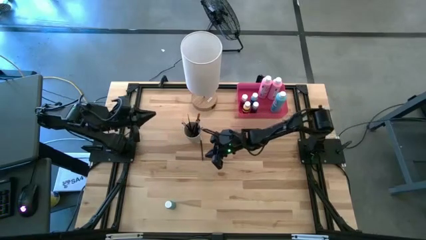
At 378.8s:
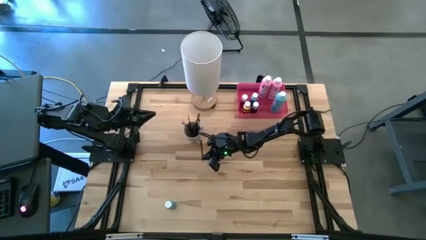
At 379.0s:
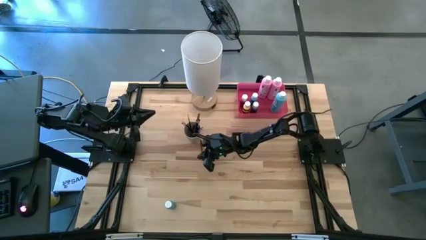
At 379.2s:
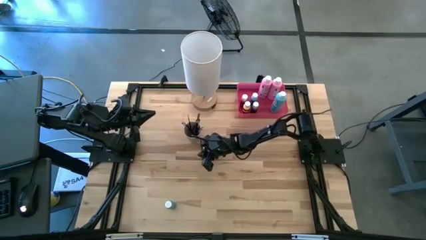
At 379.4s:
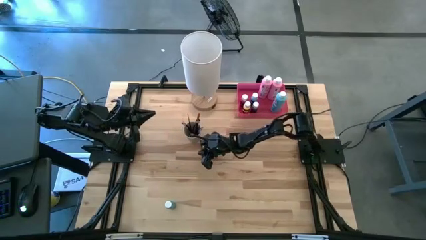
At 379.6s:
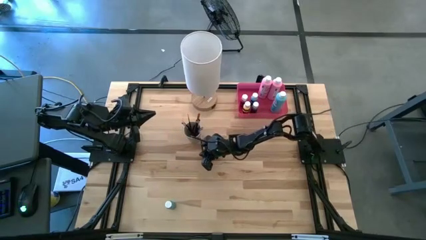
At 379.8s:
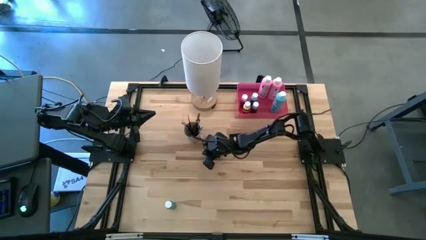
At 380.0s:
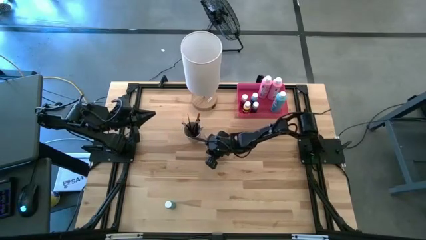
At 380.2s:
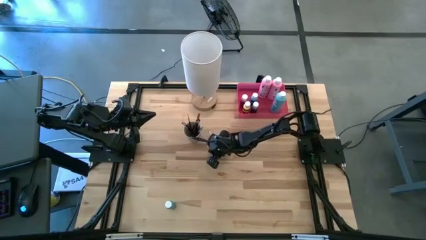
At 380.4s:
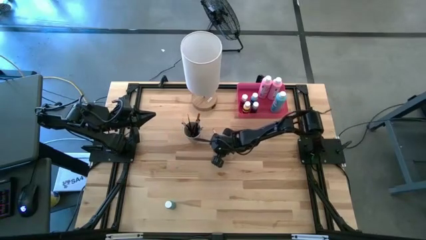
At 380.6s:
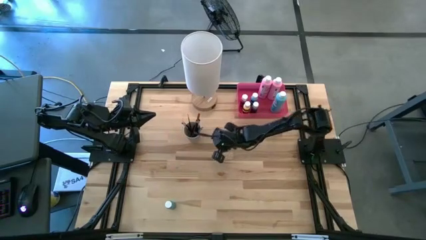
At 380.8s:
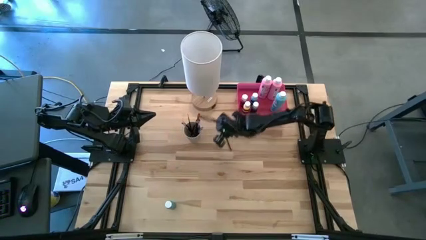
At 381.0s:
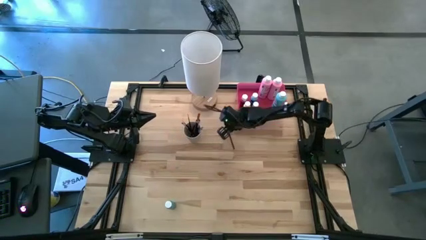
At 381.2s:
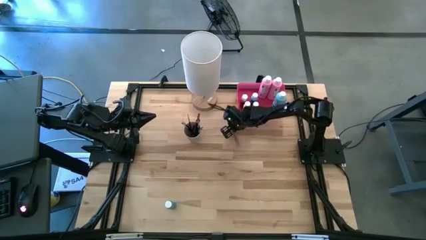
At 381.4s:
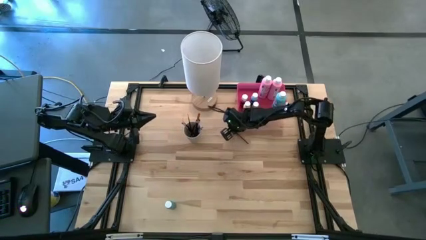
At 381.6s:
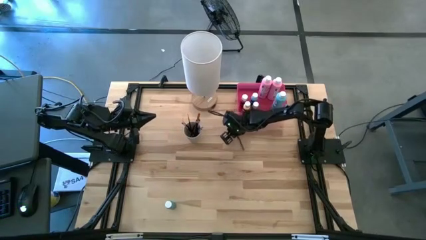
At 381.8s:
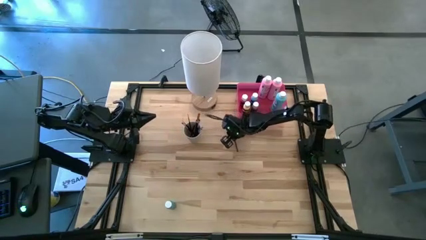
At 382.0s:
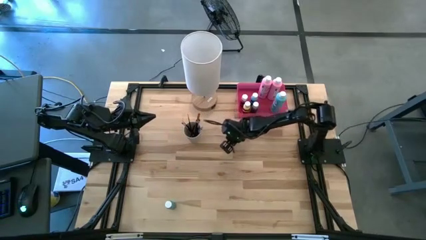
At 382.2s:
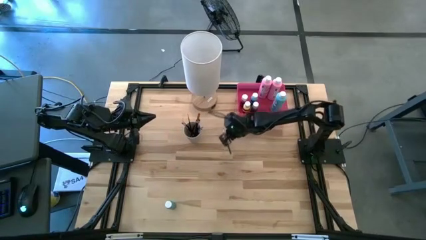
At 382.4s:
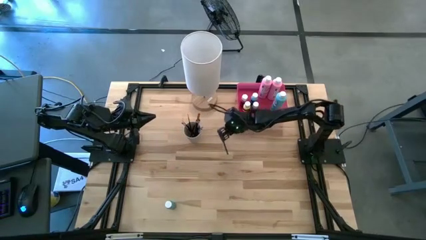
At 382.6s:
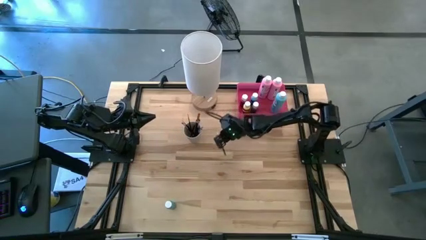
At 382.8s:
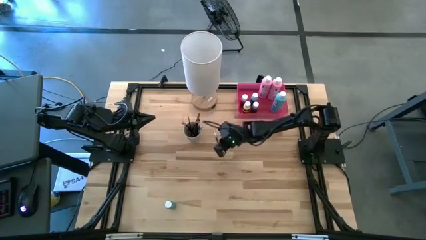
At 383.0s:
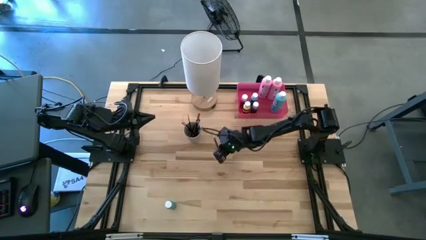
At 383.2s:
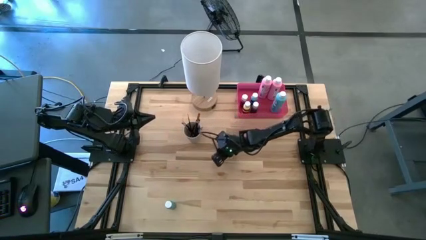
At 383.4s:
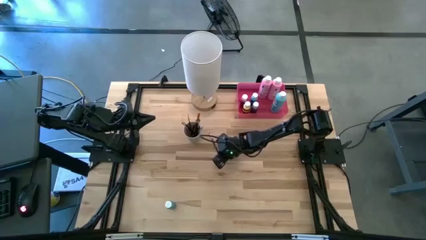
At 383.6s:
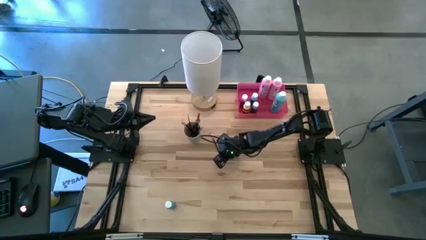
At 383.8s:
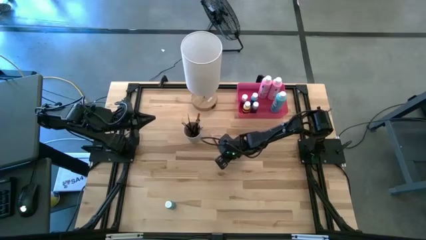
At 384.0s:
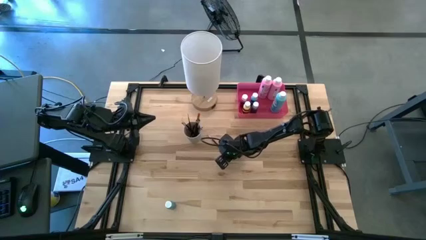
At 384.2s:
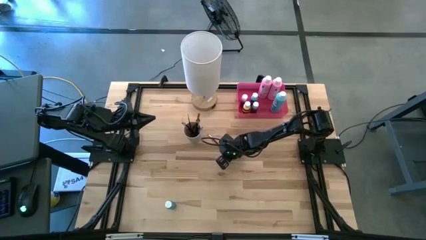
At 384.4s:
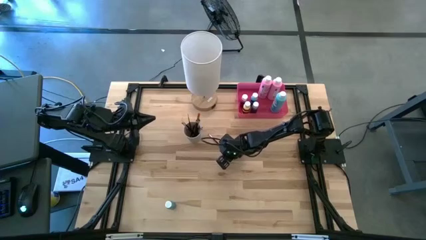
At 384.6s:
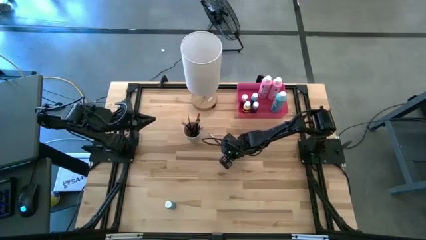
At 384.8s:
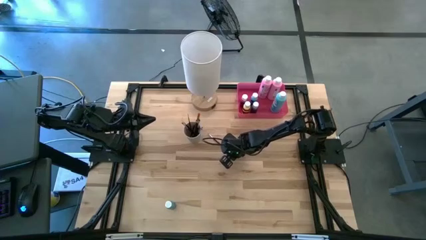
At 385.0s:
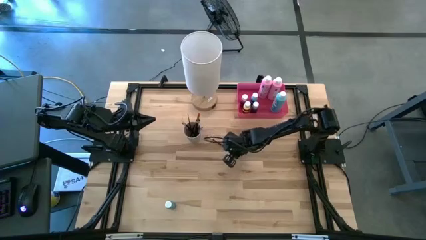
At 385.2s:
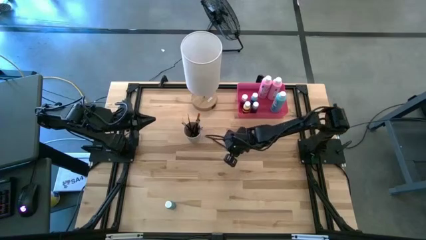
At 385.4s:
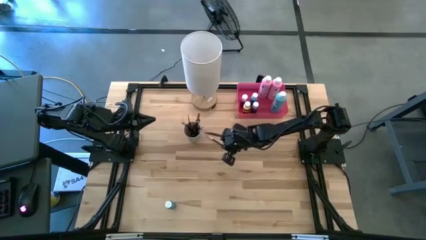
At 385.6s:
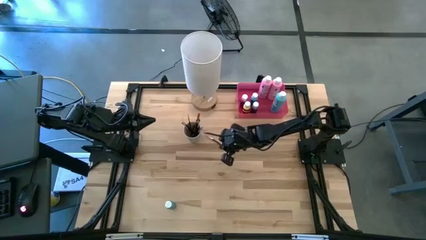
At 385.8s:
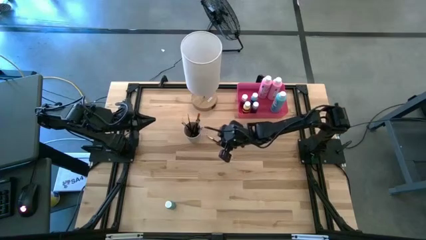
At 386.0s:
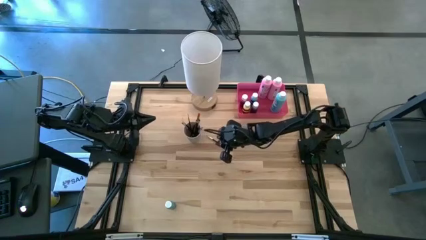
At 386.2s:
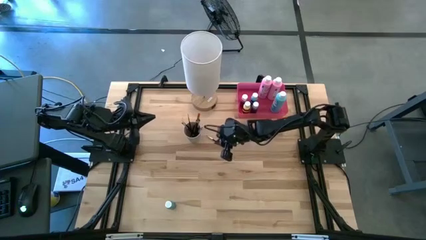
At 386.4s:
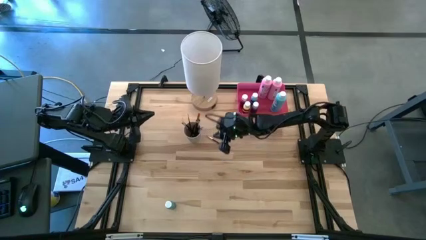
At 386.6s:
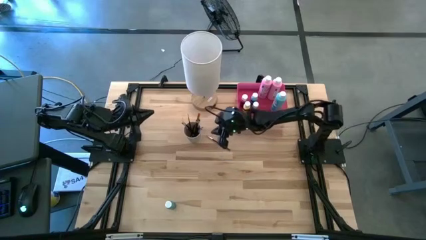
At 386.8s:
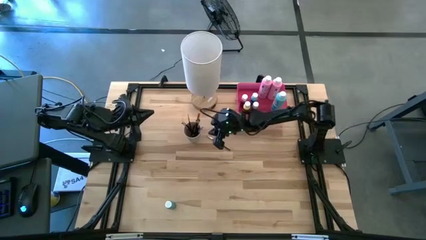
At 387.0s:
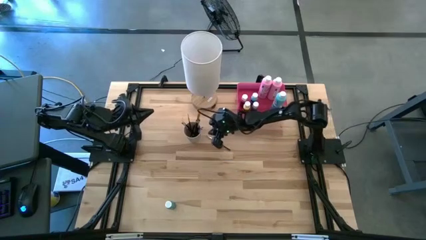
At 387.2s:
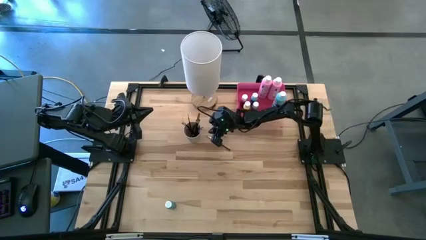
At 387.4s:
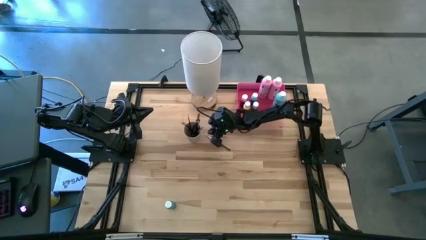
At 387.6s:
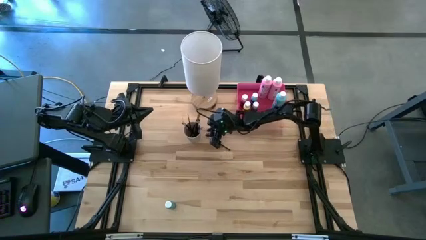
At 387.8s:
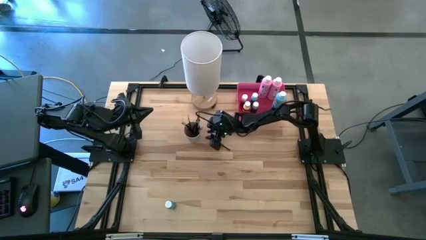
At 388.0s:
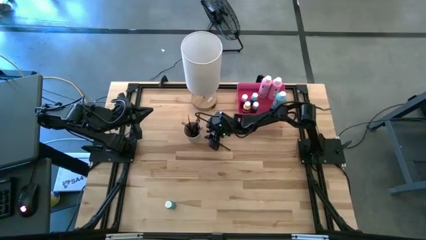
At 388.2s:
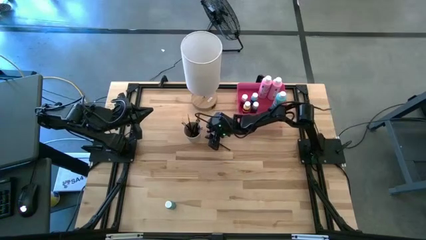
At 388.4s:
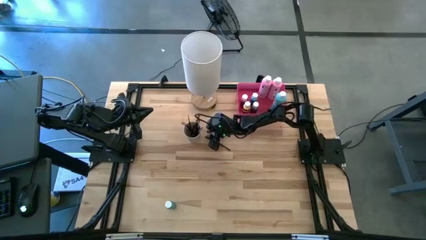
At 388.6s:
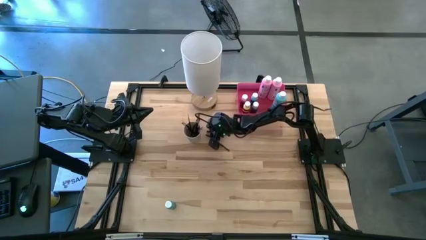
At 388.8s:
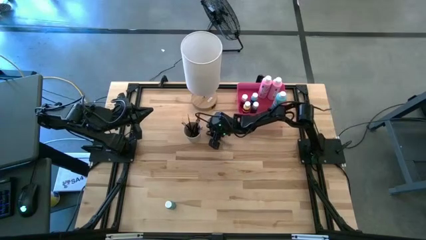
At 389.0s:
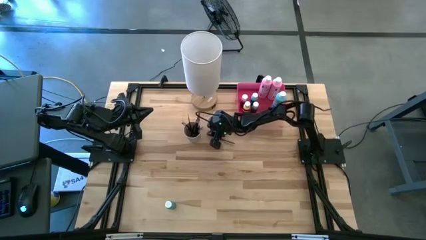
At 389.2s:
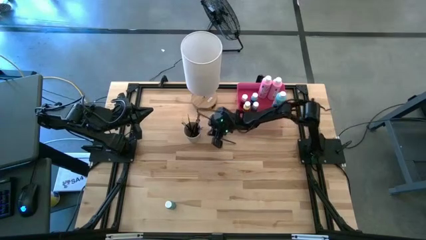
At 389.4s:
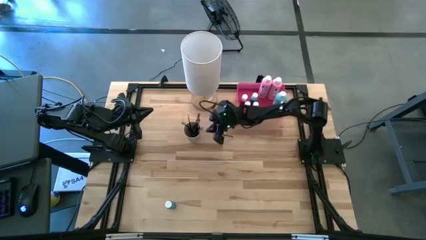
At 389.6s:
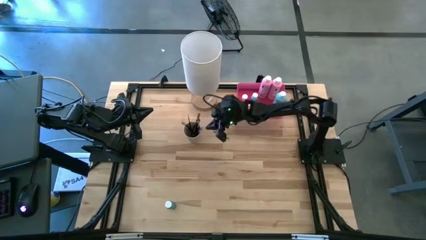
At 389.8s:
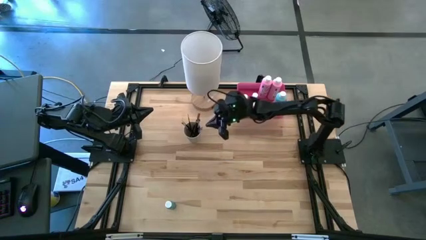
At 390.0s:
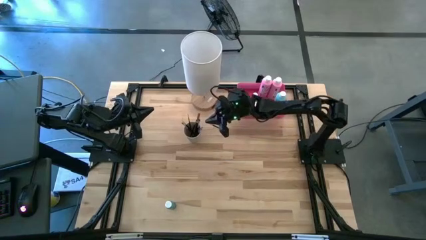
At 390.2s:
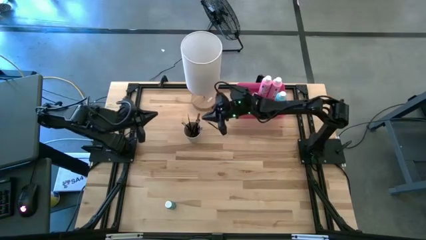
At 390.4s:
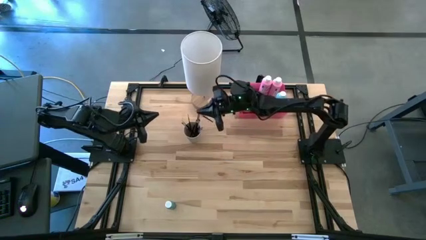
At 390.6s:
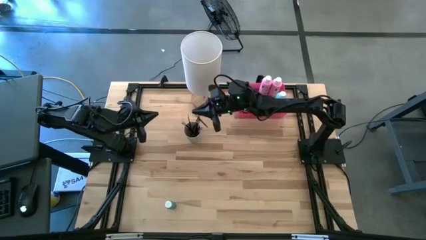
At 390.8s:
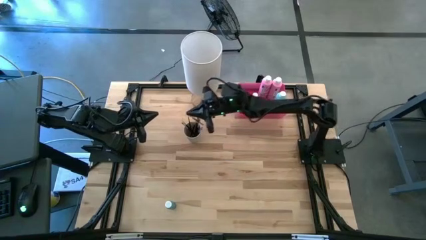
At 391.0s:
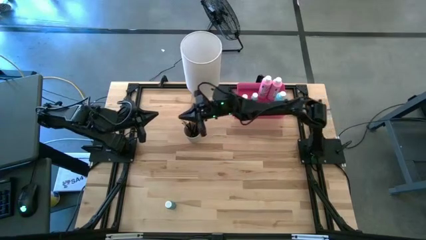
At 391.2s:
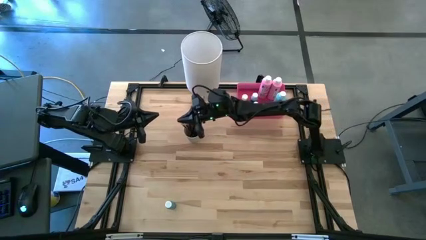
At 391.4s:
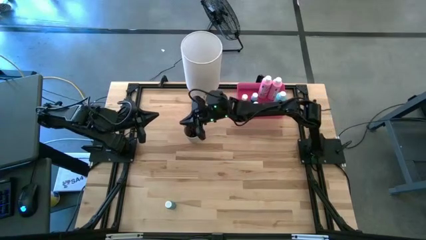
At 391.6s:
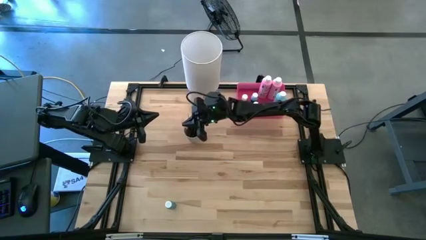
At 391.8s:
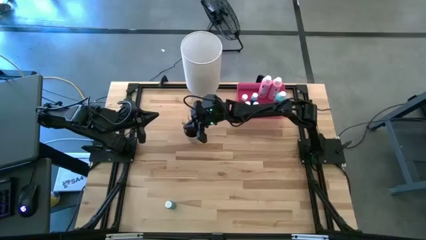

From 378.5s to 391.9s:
Task: Pick & Place Paint Supplies
Put the silver eyeshadow brush into the white cup
